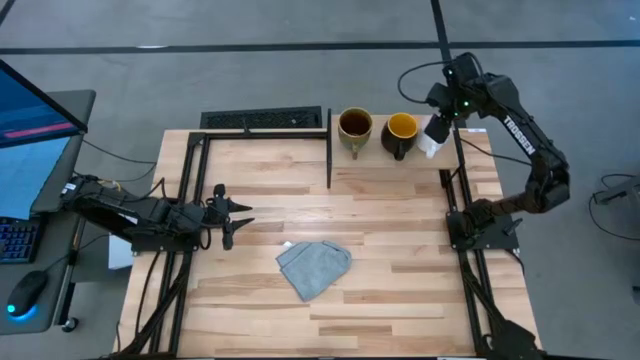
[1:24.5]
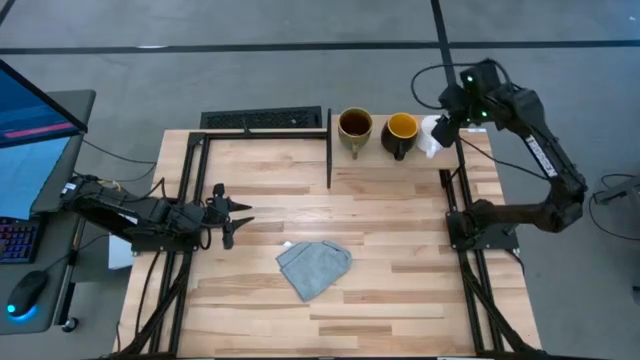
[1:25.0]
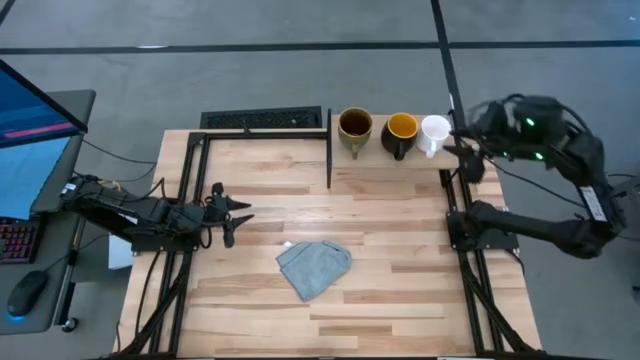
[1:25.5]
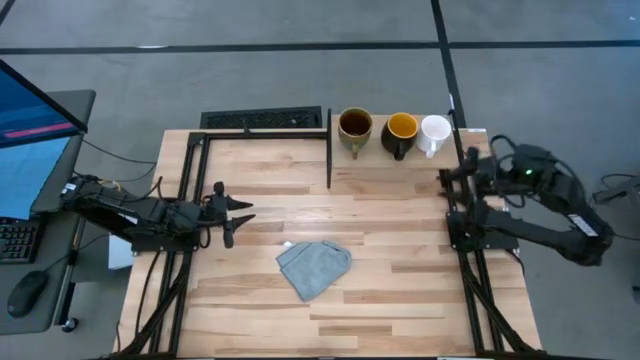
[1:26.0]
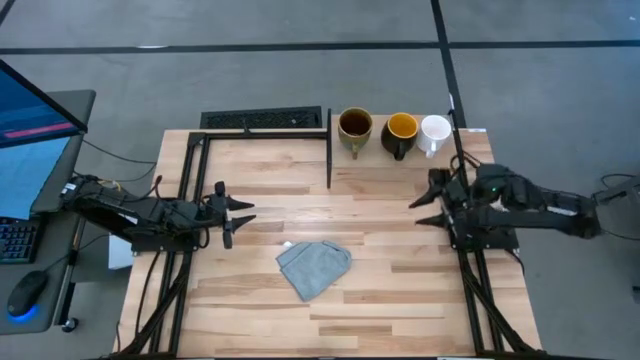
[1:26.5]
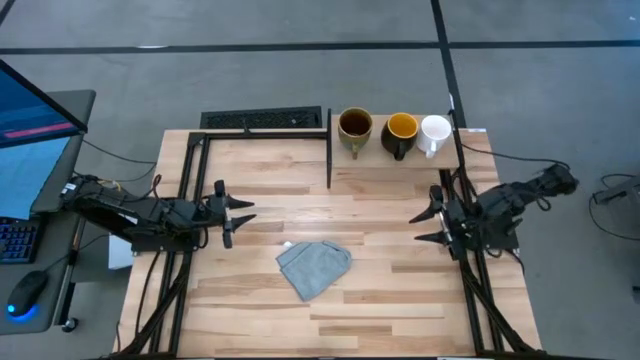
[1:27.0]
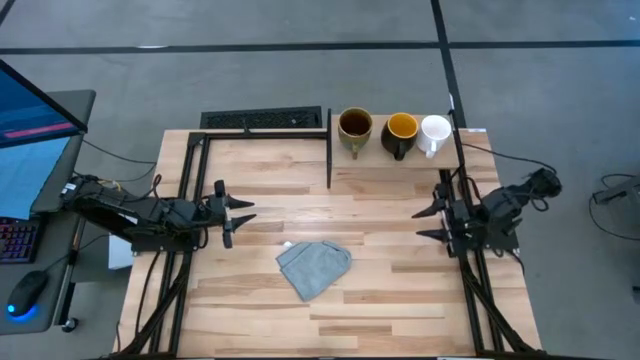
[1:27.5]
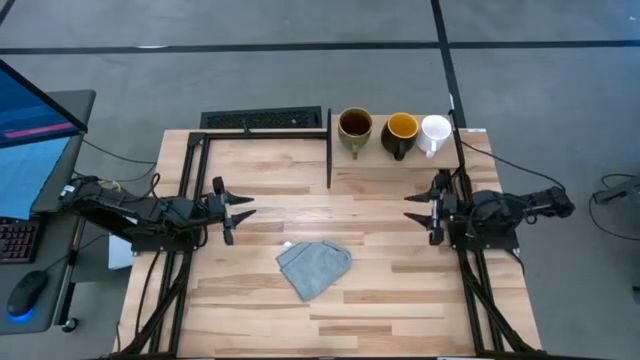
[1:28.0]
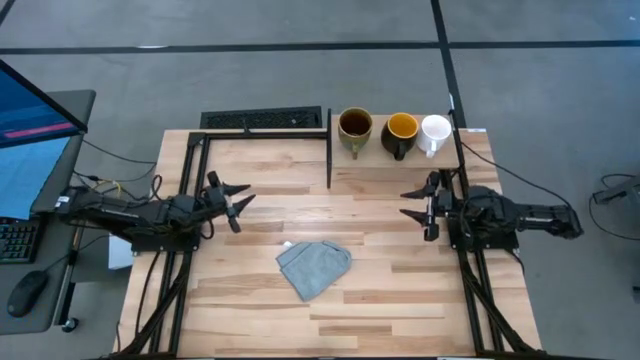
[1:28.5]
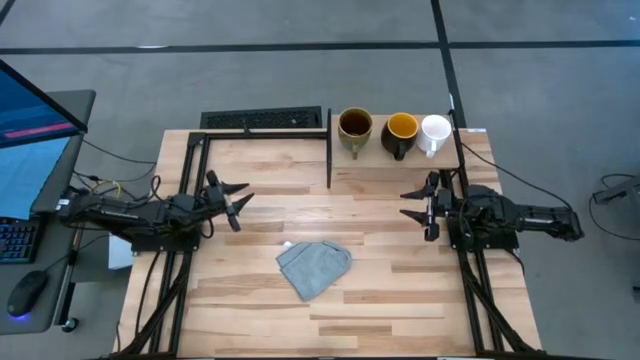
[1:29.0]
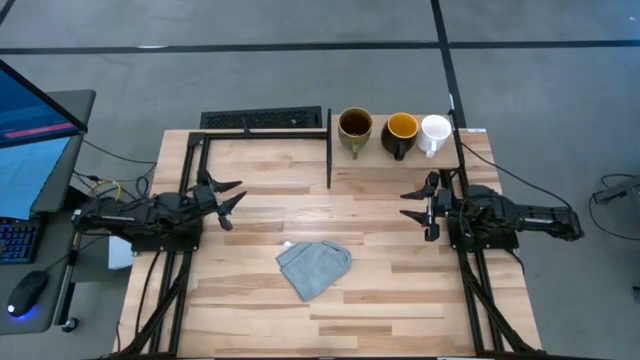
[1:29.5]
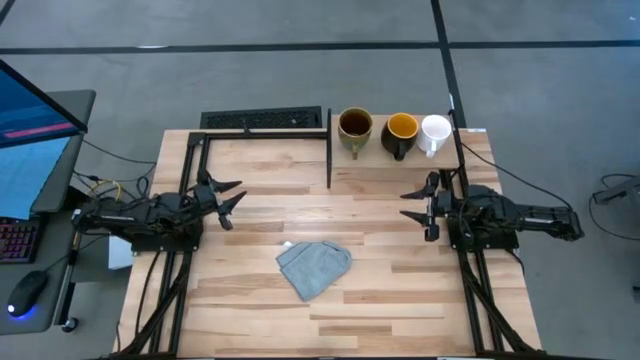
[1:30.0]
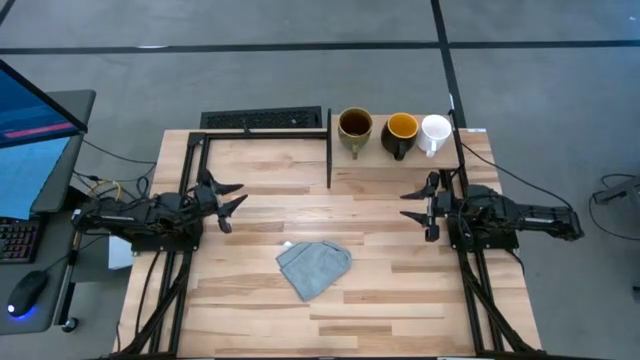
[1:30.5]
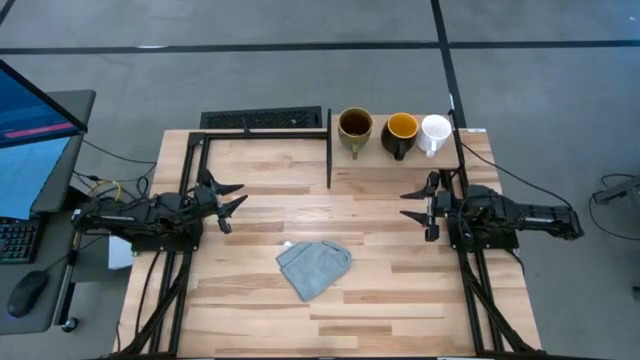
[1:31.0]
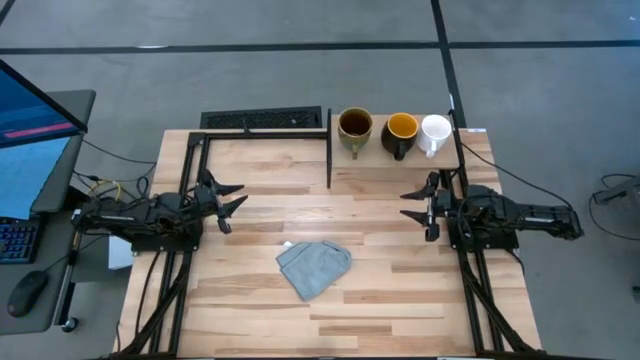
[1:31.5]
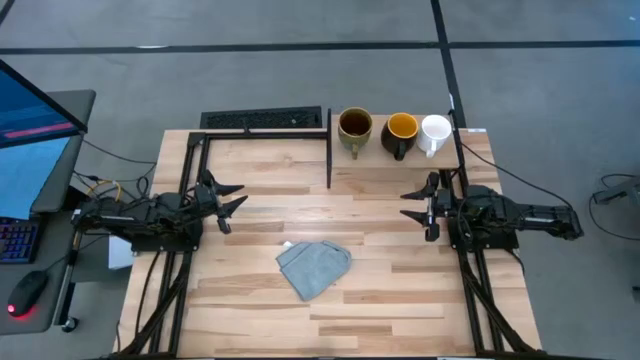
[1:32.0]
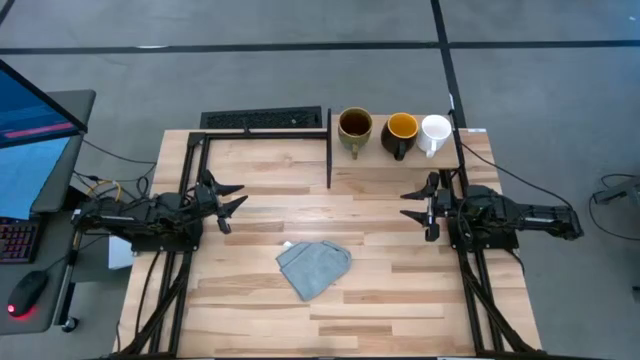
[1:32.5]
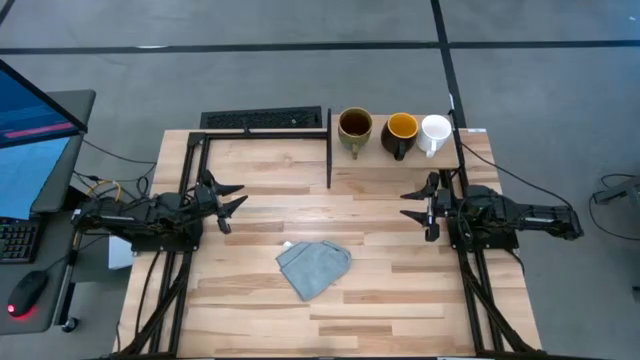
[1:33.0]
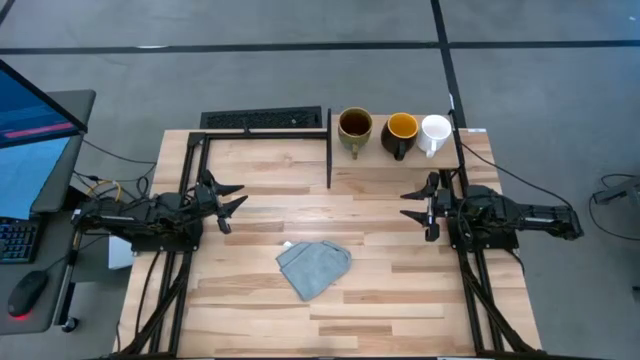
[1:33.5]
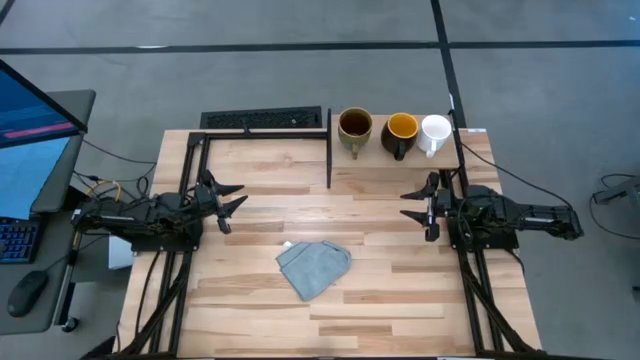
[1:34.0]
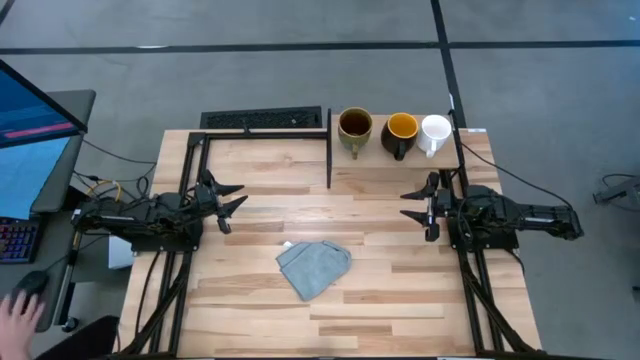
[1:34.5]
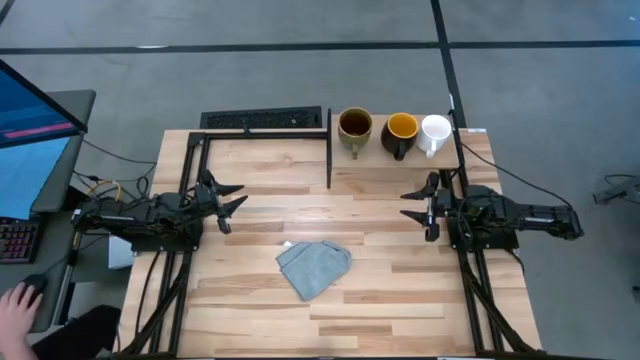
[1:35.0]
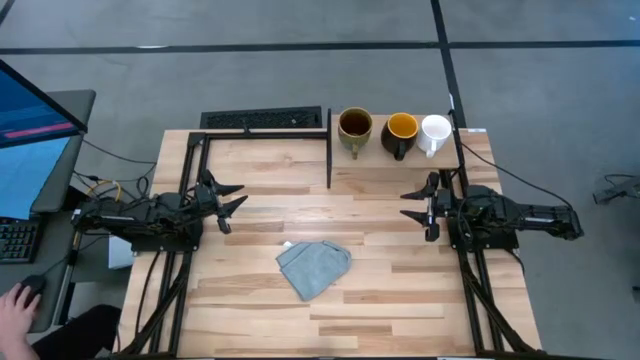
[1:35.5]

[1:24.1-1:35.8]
Task: Stack small to large cups/mugs on shelf
Return to Home Position

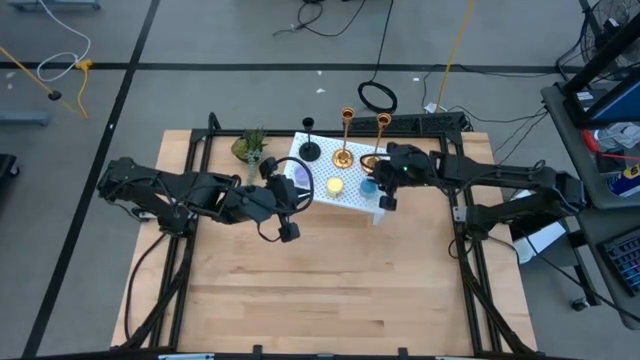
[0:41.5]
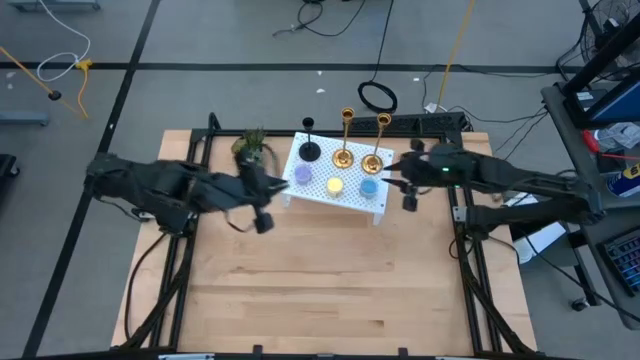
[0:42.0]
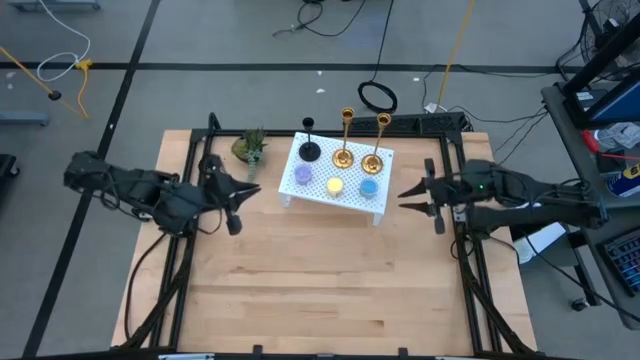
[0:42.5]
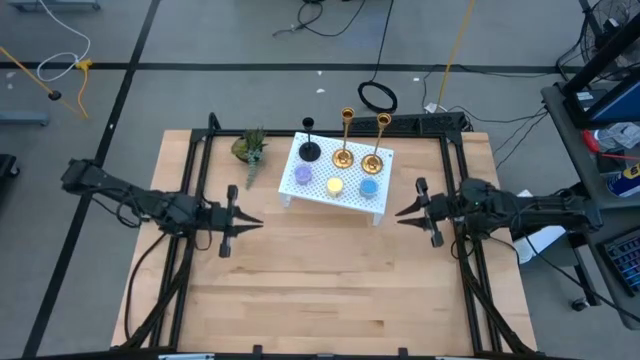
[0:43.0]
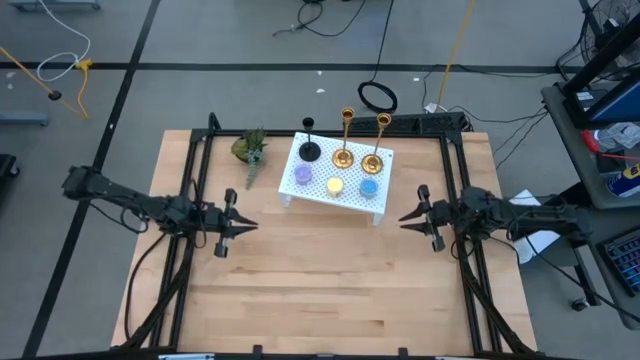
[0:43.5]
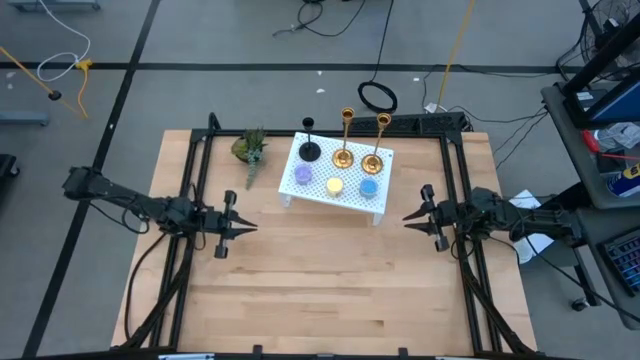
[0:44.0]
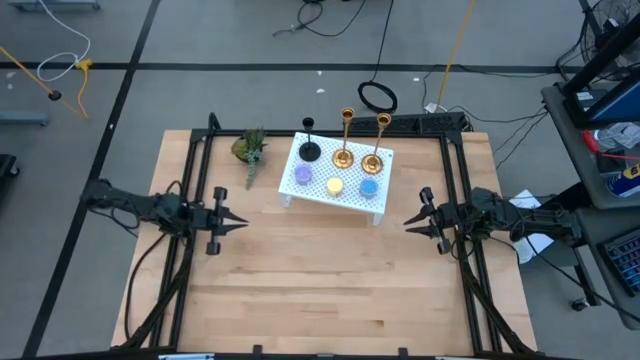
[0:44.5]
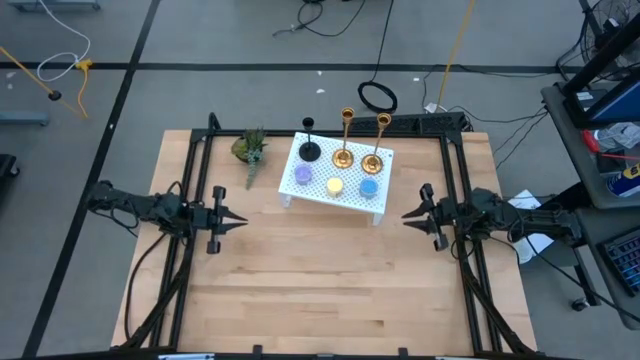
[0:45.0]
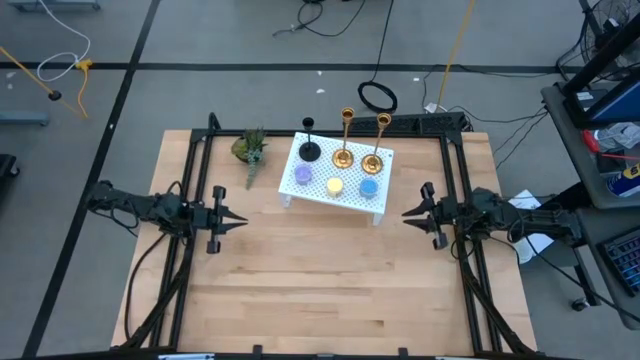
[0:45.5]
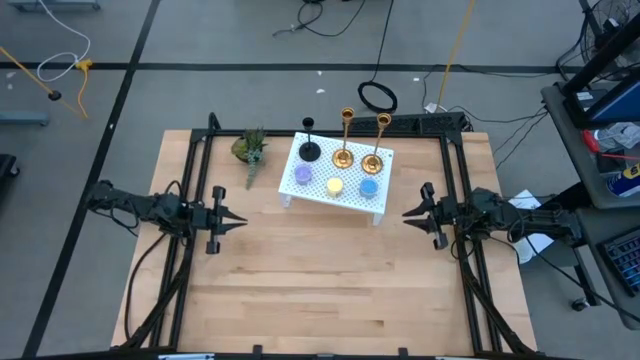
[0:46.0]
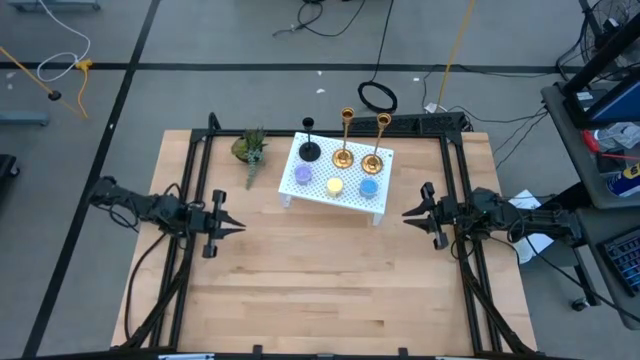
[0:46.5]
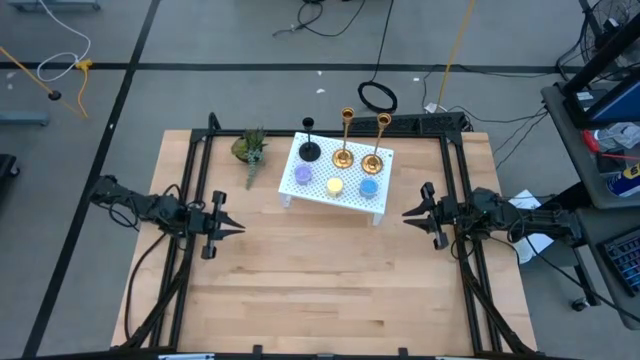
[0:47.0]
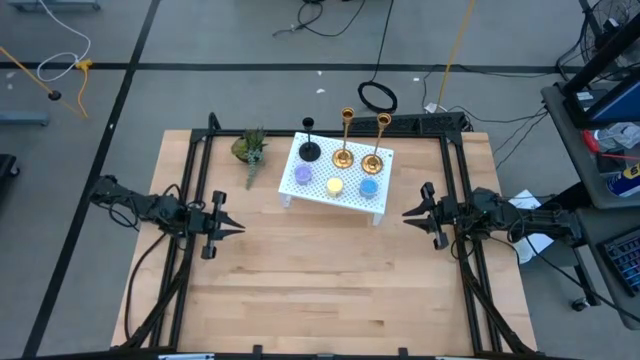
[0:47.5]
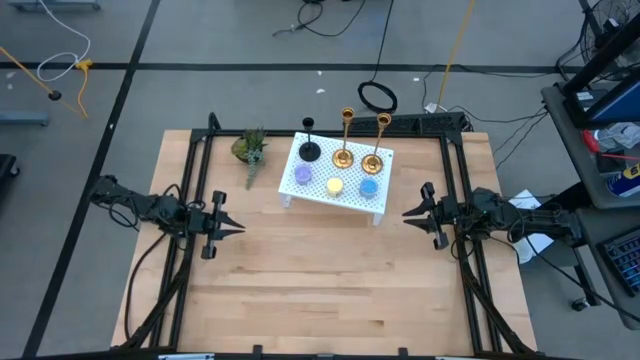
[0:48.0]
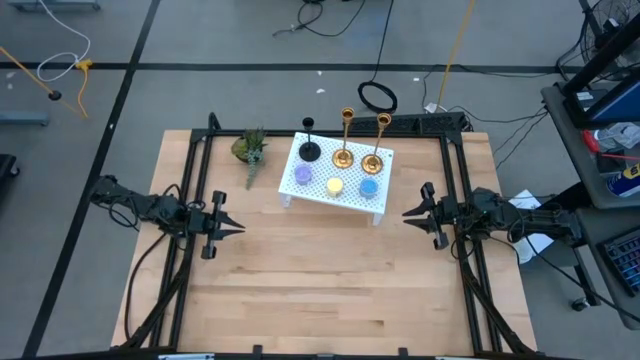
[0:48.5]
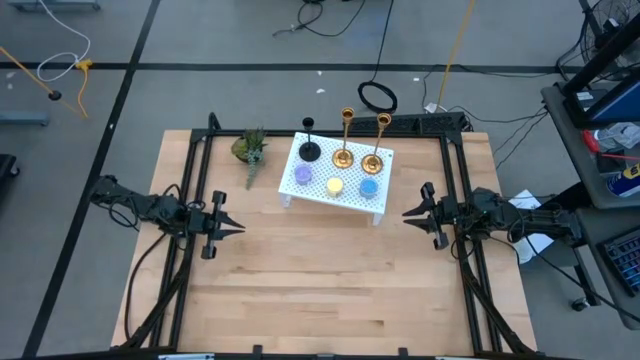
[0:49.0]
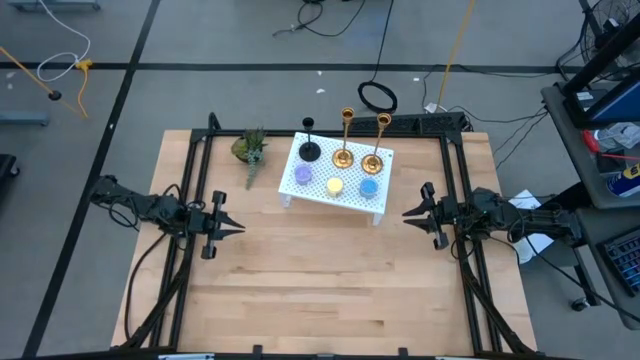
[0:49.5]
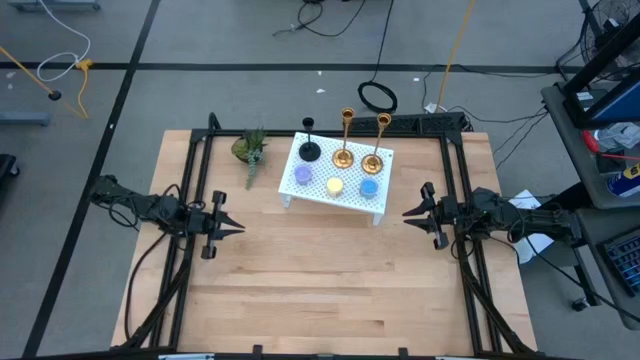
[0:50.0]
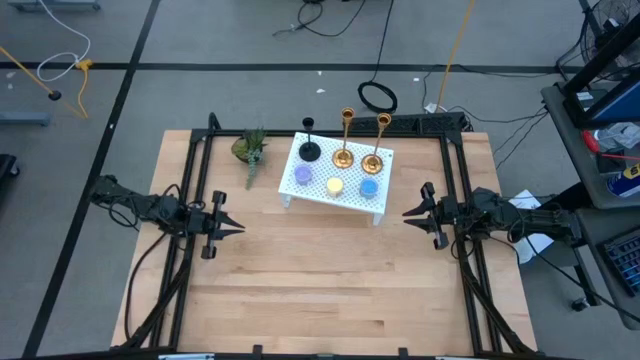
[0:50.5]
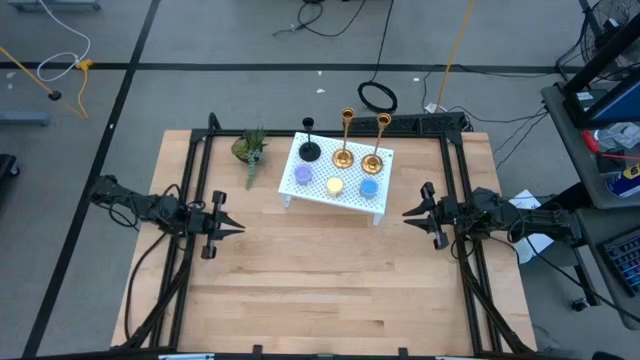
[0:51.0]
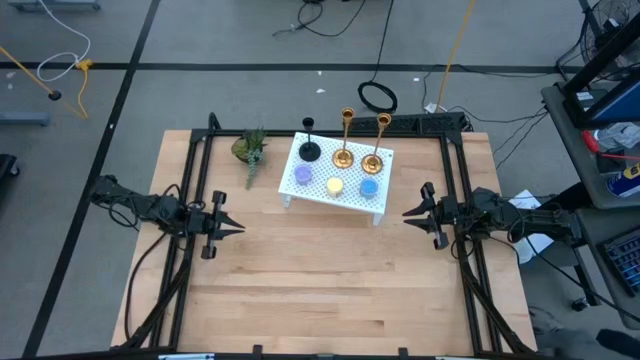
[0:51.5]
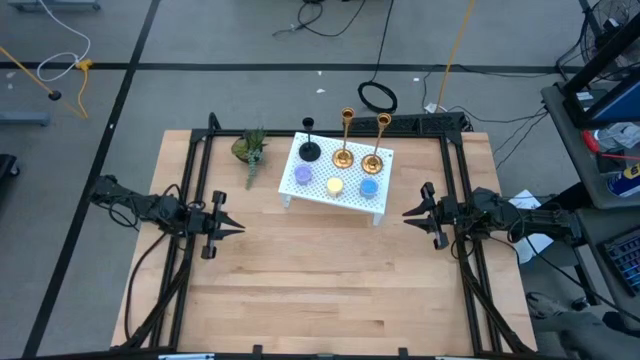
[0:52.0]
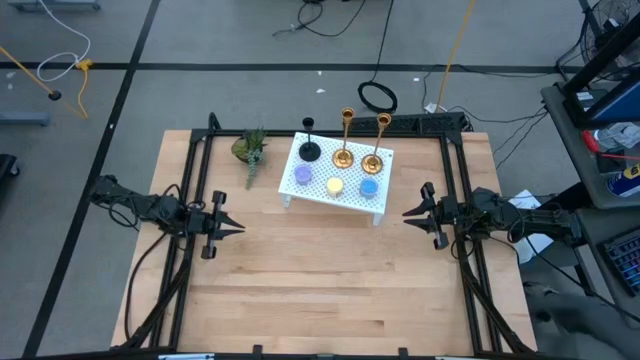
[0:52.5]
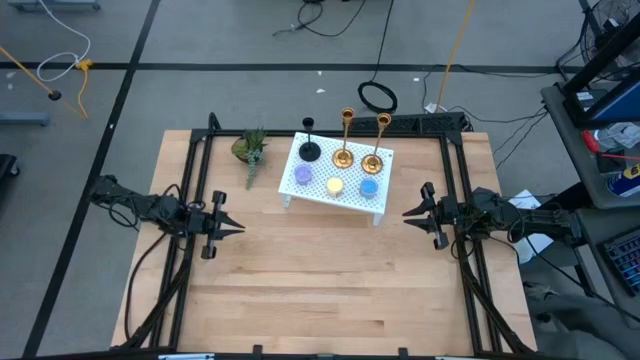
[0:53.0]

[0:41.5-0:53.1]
Task: Pick & Place candle stick holders
Return to Home Position
